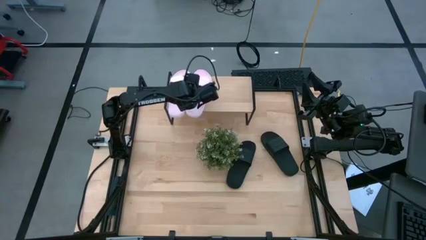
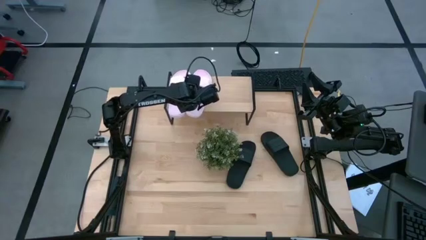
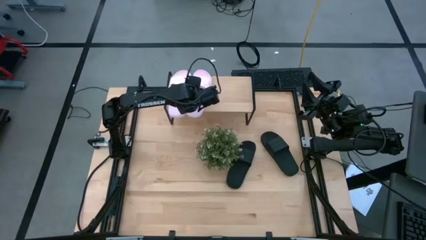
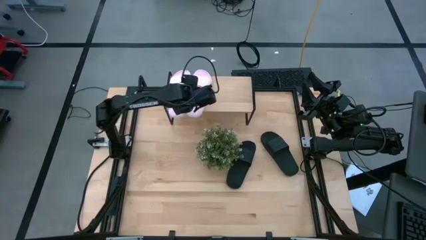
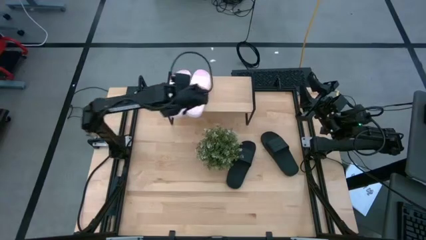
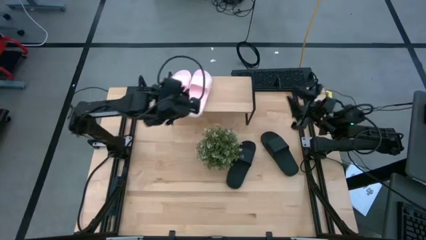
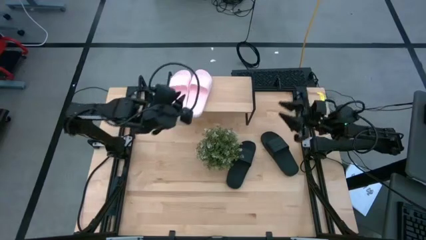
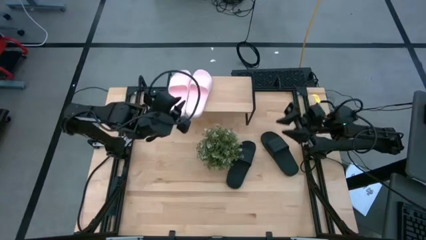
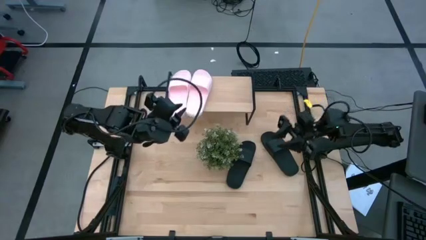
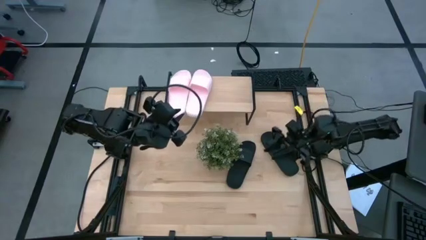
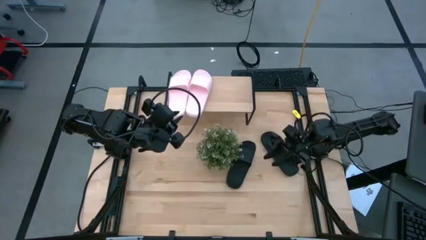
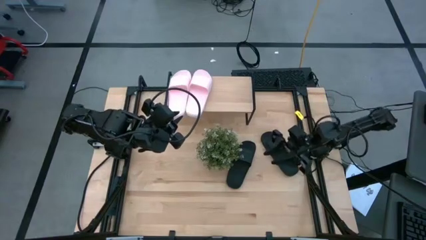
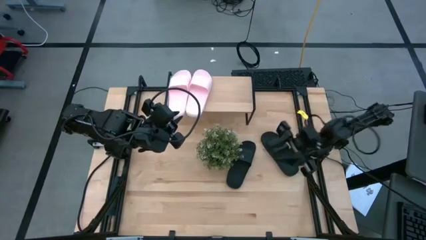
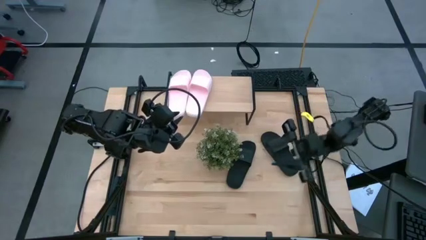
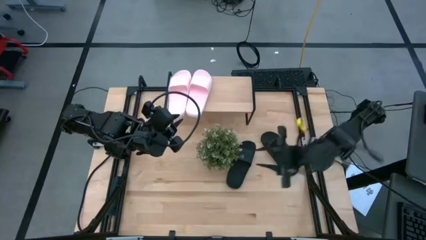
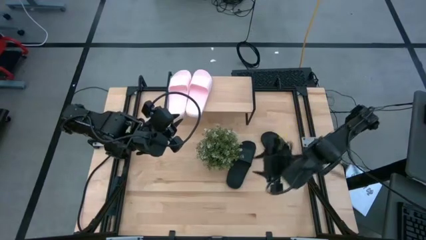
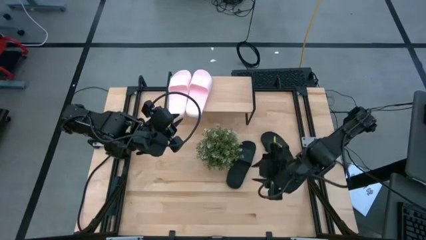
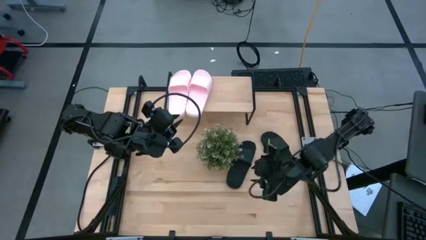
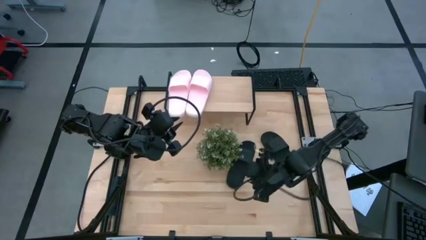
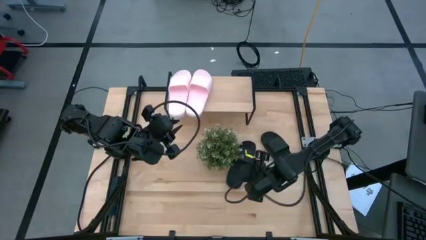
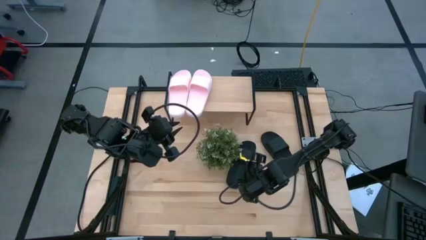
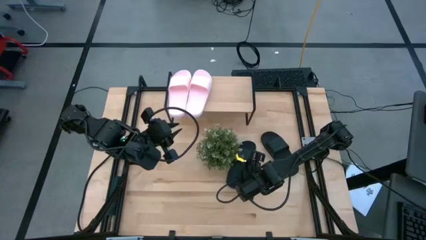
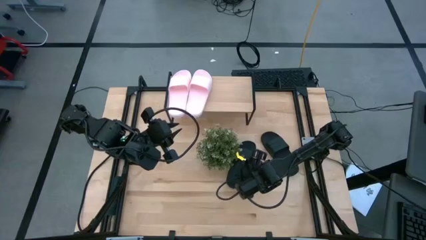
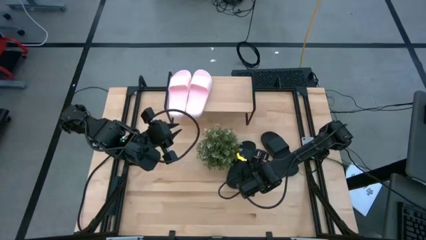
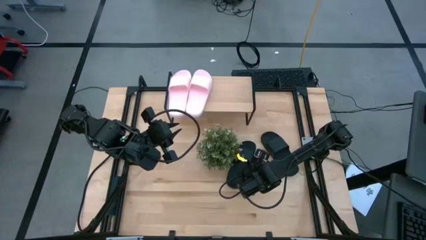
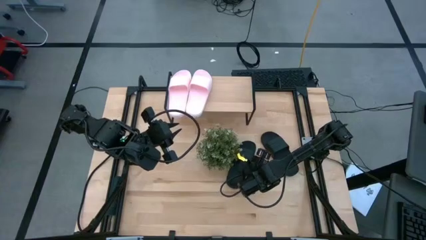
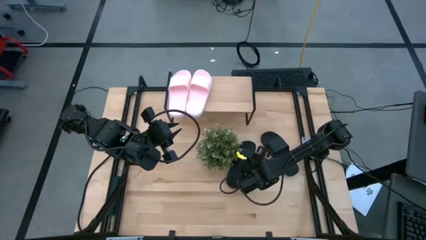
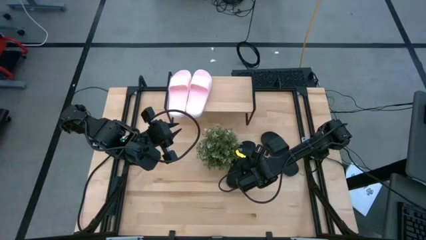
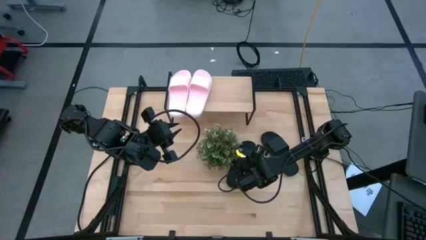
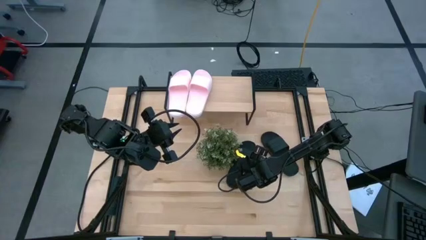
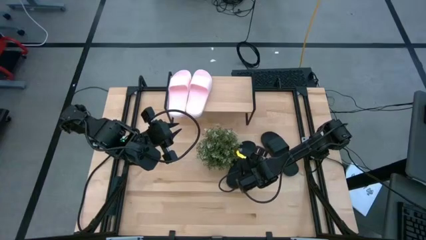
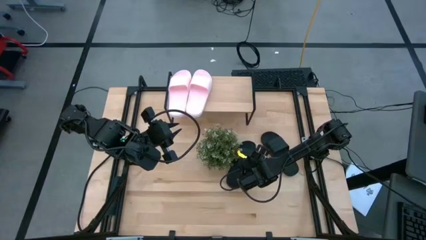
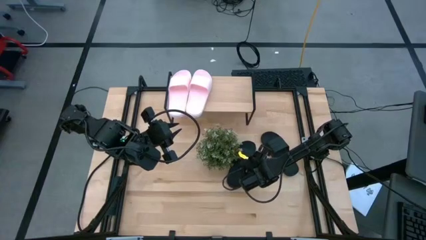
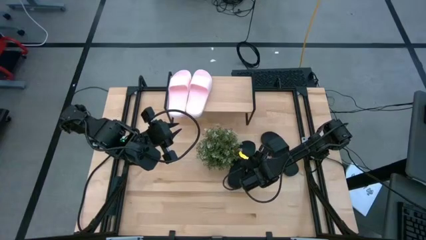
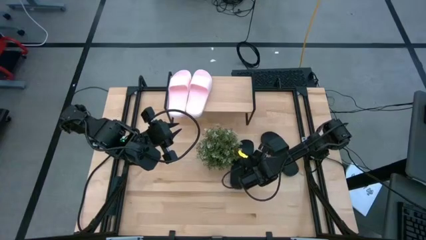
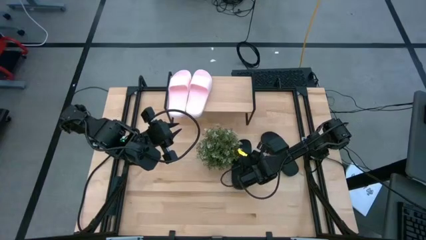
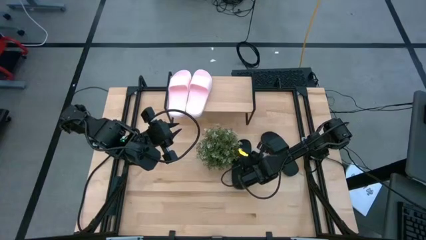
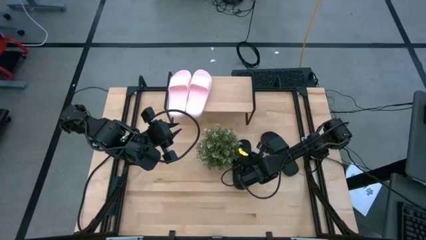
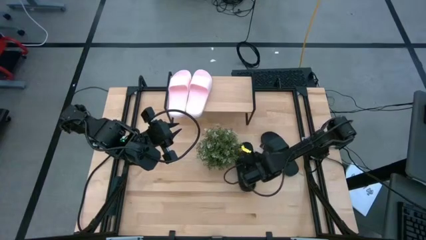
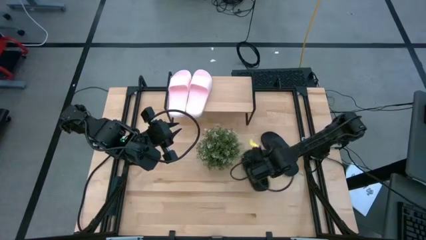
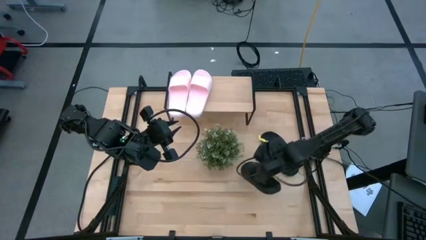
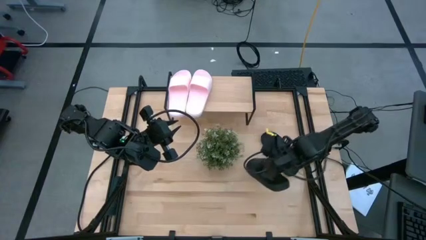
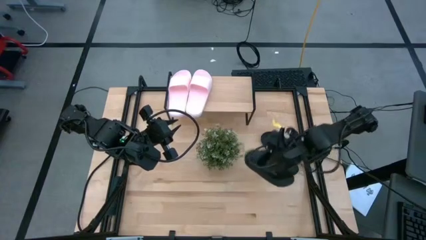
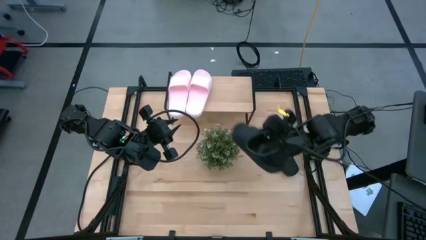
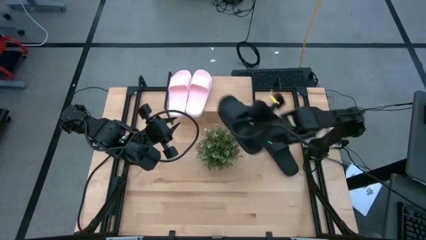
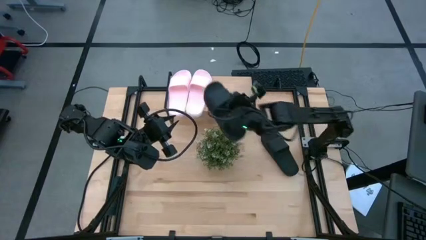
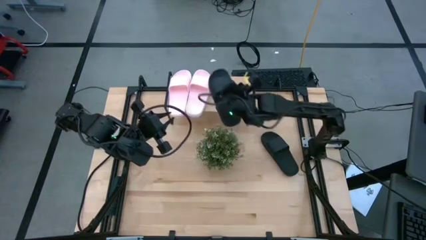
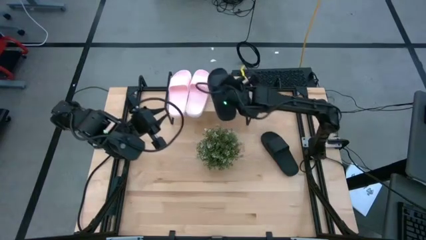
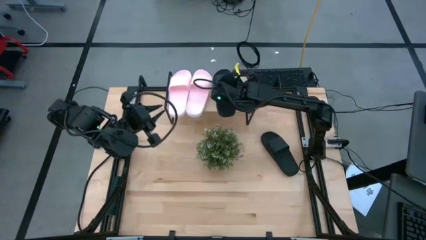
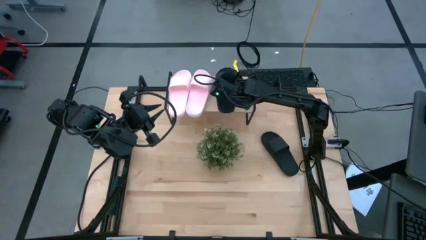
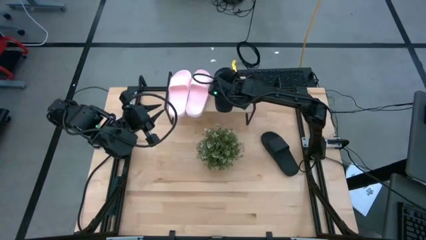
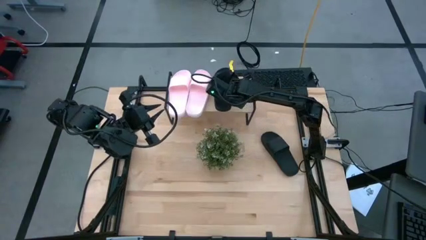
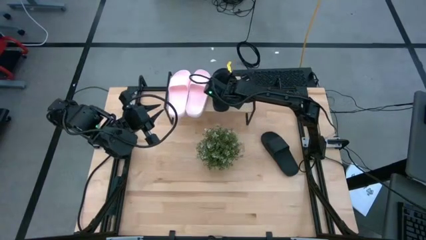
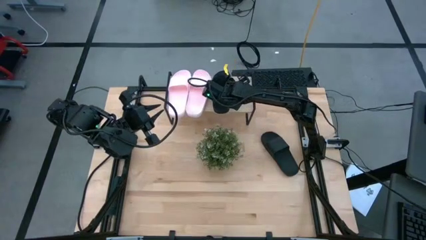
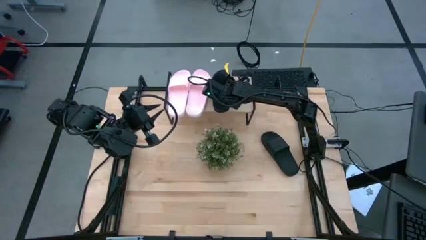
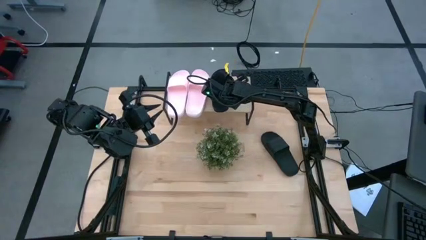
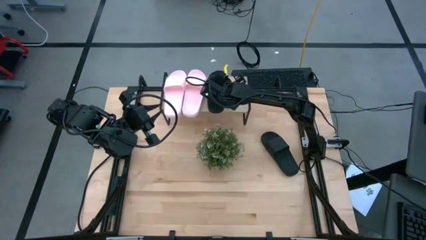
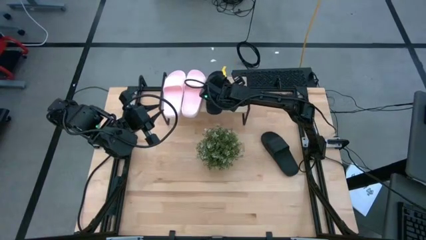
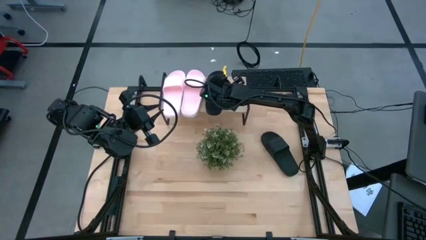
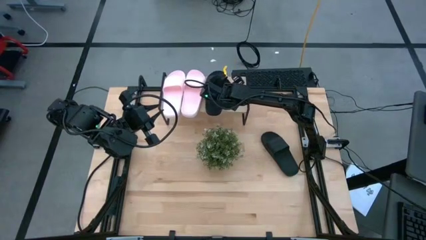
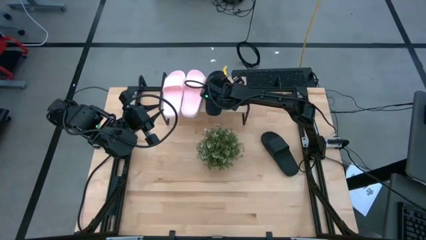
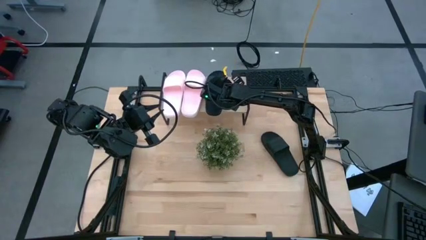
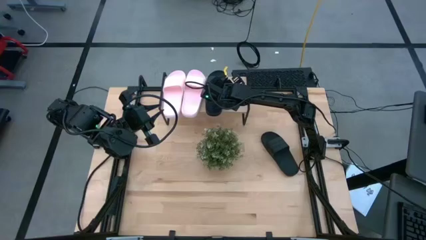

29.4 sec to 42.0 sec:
Task: Pick and place slides into the shelf
Put the left black slides on the shelf
